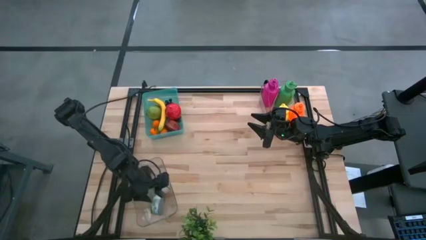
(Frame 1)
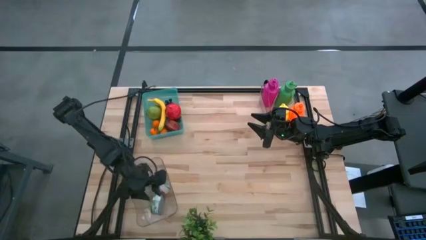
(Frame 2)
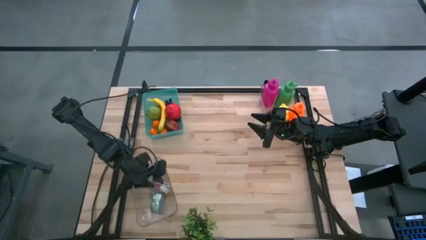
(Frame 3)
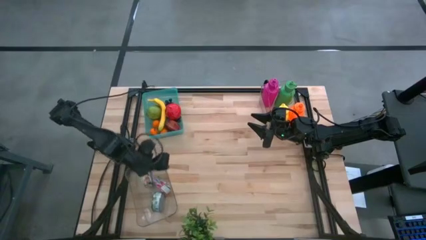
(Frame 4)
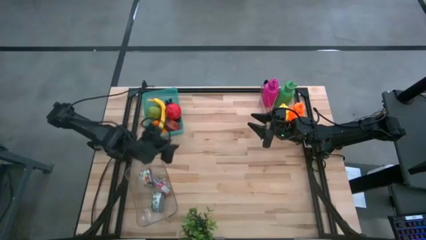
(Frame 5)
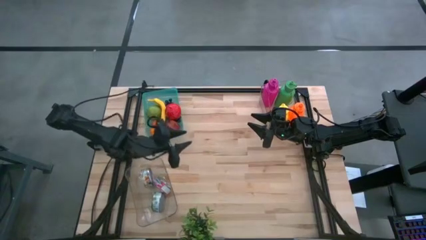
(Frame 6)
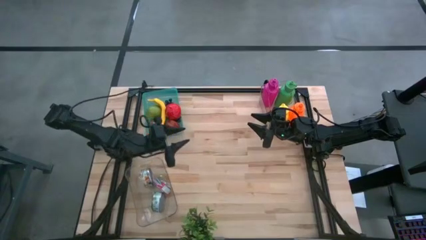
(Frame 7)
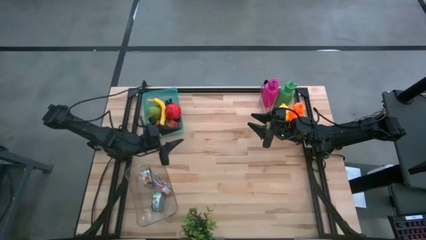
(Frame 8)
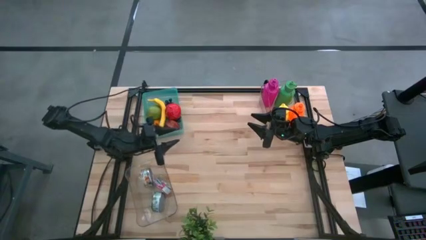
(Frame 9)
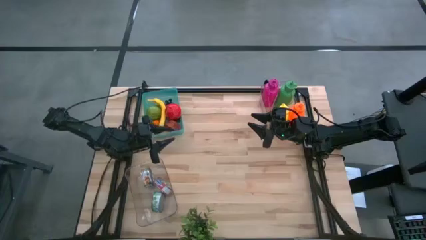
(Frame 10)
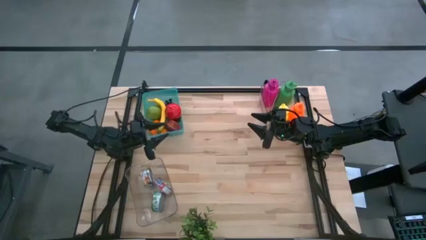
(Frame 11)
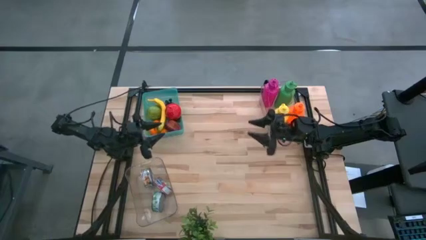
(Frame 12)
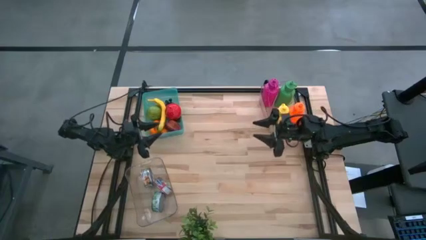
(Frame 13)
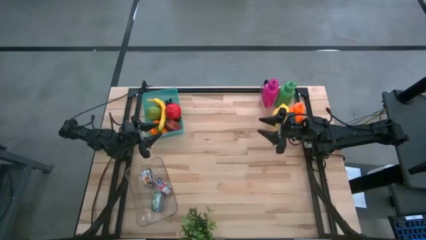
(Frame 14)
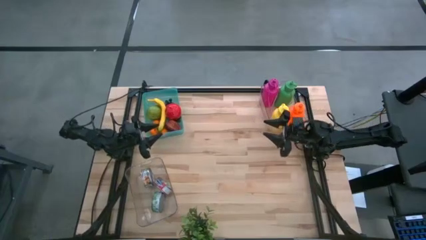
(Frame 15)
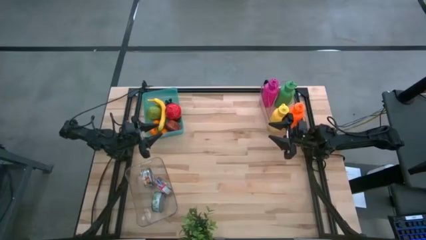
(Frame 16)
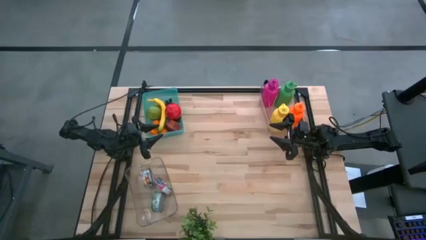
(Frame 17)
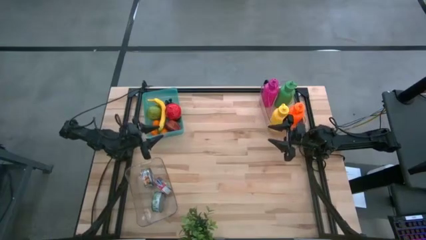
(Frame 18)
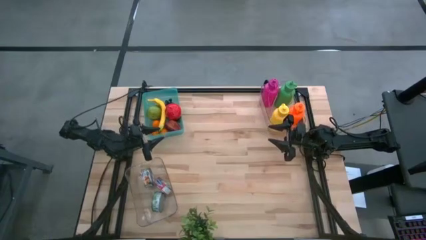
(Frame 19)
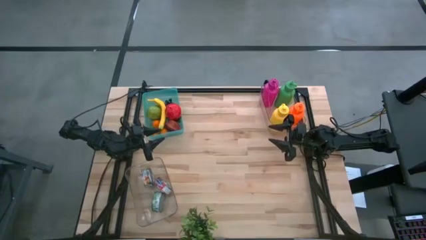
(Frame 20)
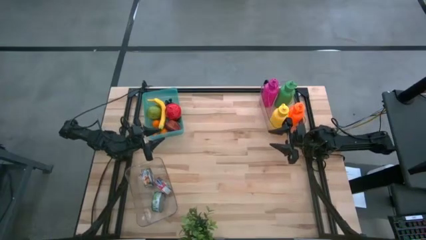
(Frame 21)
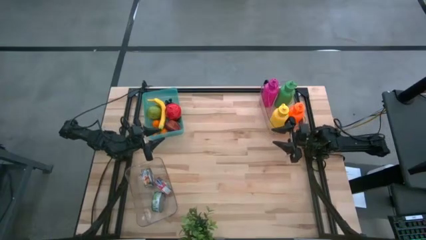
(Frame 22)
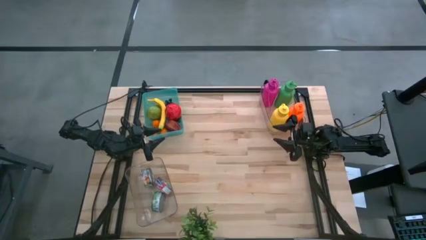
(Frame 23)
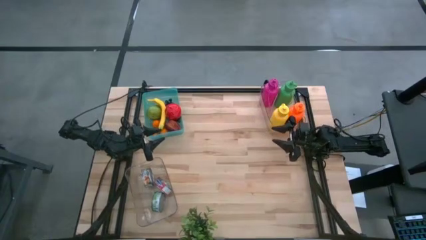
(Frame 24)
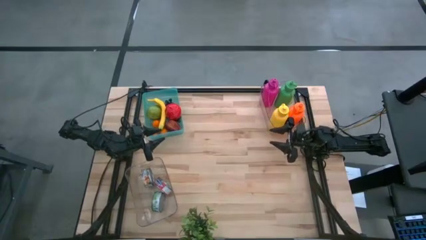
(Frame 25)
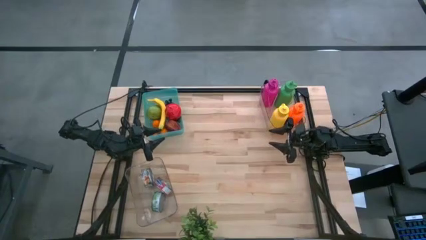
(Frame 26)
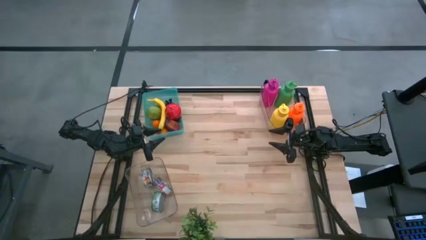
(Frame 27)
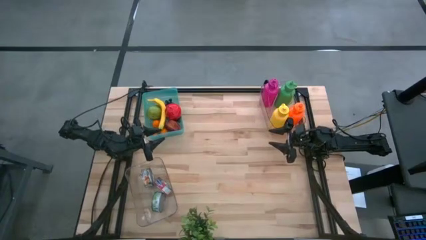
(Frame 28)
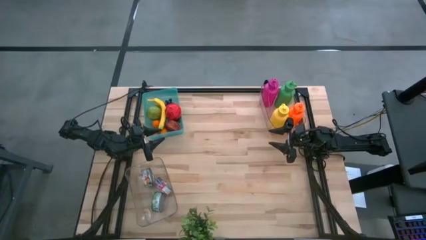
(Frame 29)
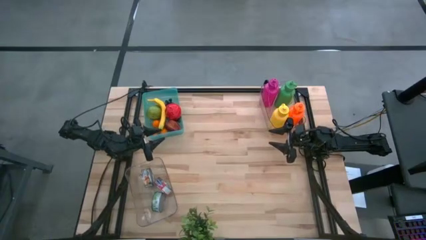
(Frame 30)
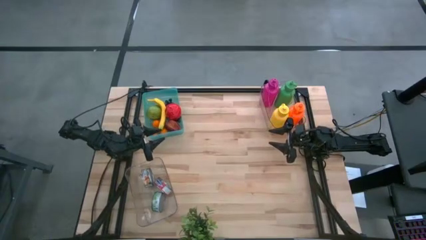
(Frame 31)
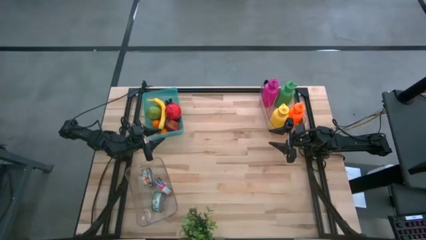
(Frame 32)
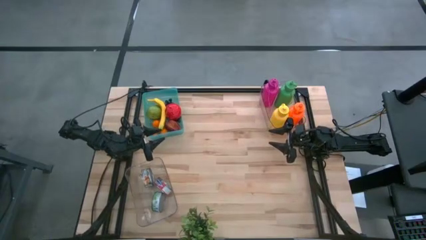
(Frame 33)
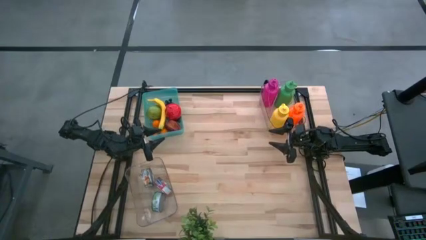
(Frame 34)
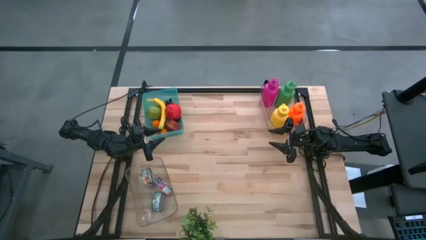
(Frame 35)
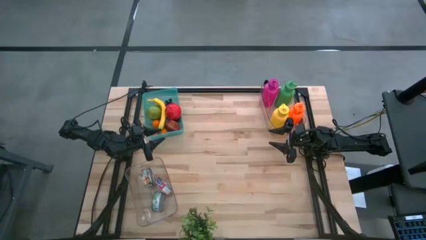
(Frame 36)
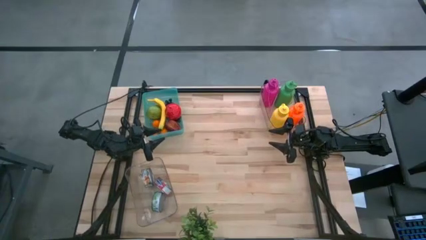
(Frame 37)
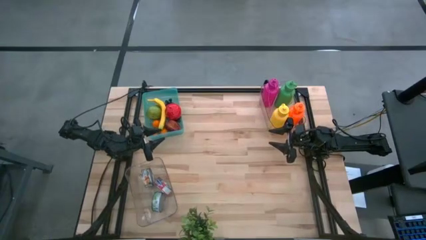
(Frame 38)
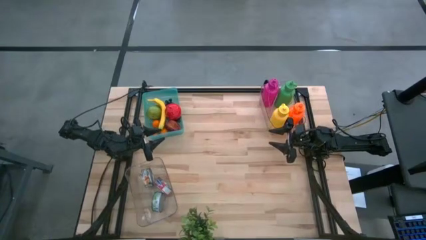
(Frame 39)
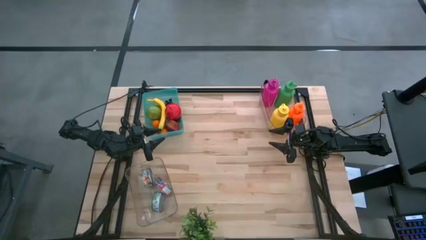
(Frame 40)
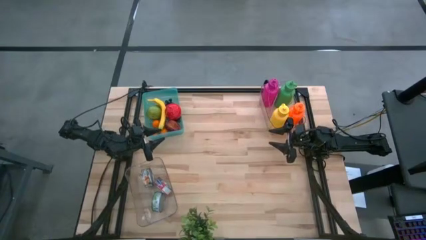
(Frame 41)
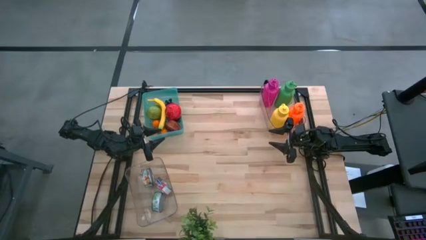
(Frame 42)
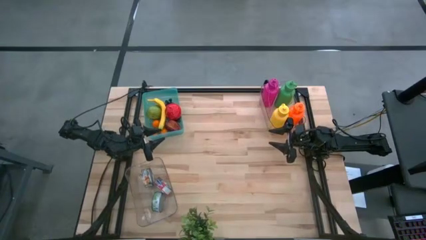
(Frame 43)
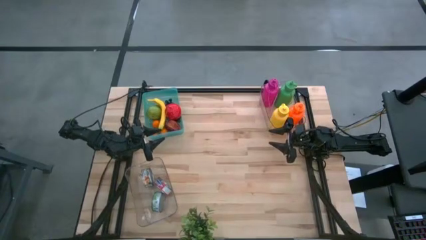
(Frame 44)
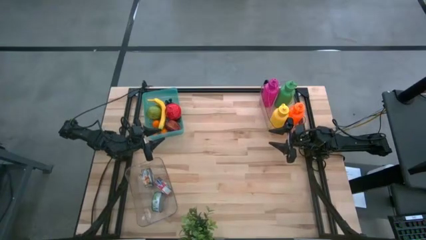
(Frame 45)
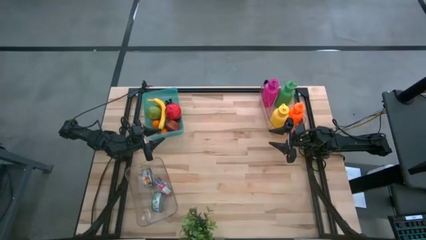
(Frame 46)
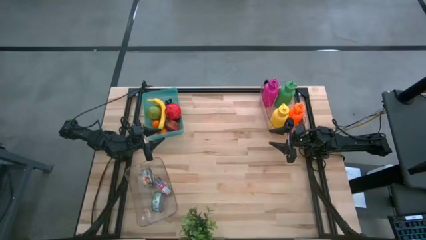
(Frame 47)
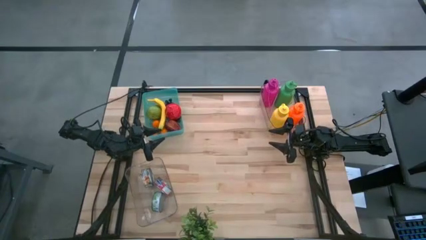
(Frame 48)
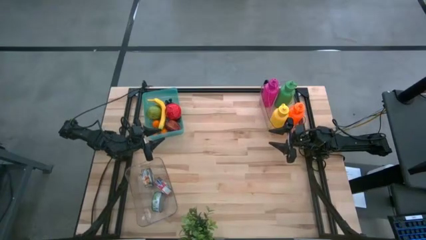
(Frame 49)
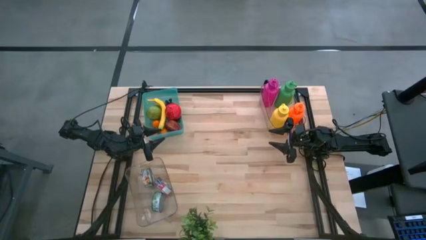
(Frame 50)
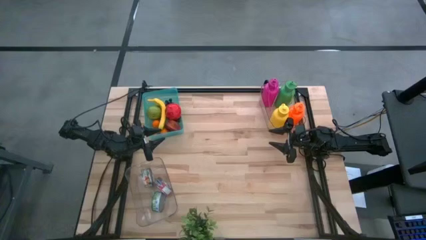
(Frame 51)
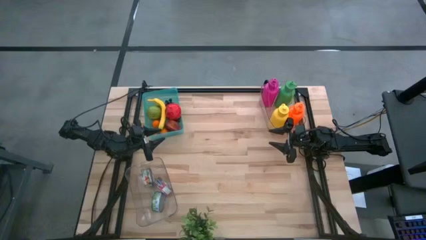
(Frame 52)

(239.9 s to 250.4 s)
Task: Pick & Place Food Item
Return to Home Position
